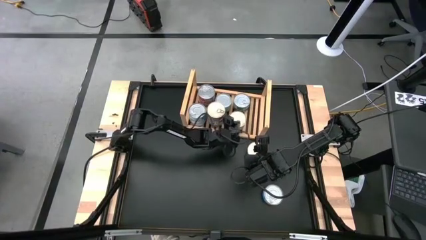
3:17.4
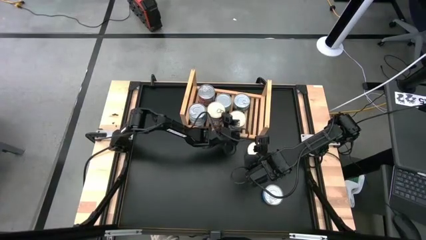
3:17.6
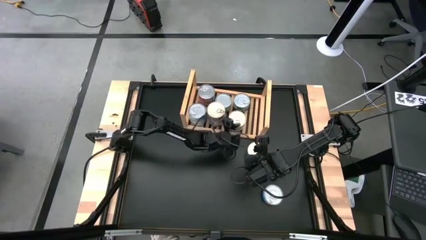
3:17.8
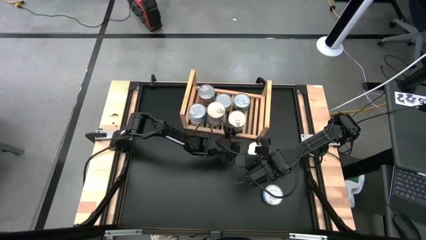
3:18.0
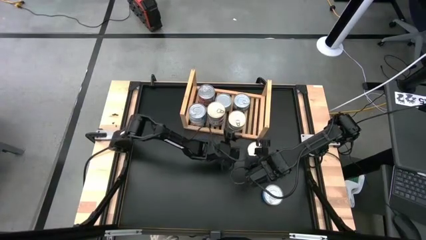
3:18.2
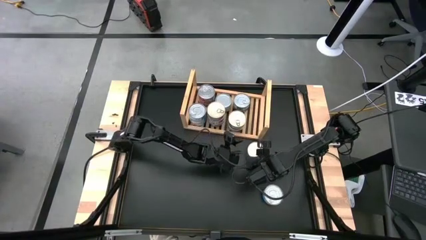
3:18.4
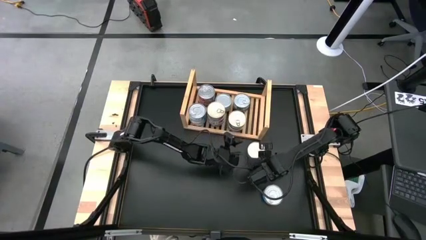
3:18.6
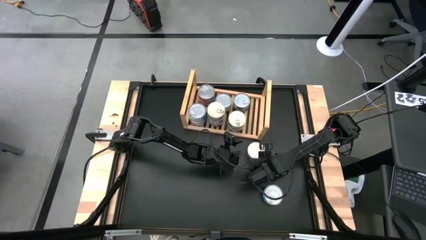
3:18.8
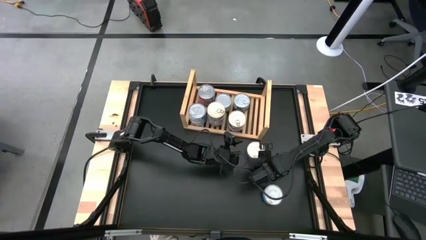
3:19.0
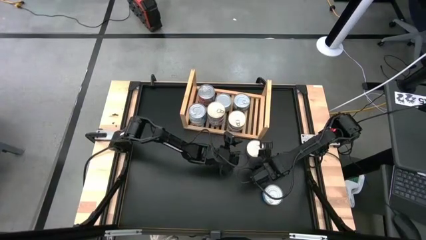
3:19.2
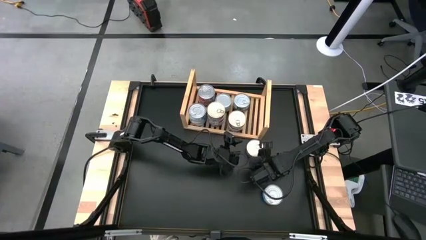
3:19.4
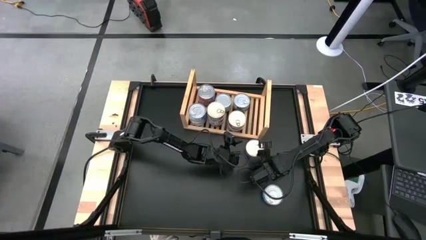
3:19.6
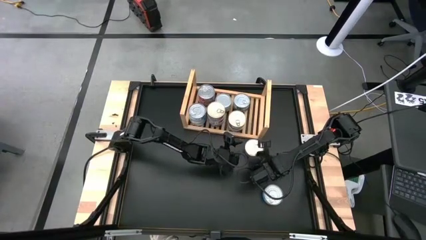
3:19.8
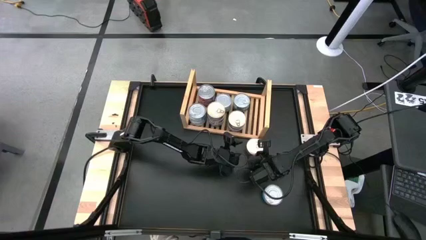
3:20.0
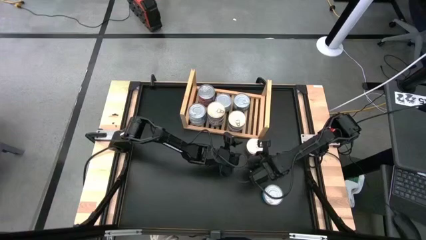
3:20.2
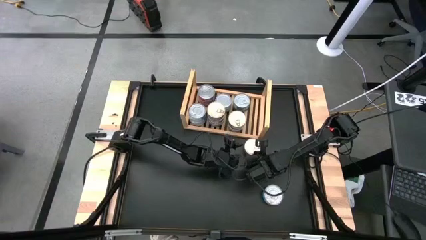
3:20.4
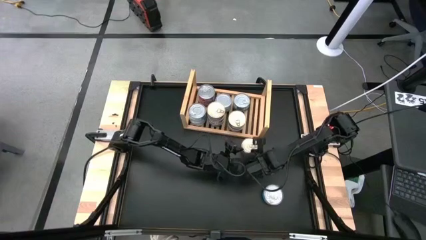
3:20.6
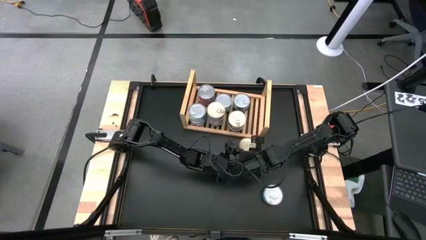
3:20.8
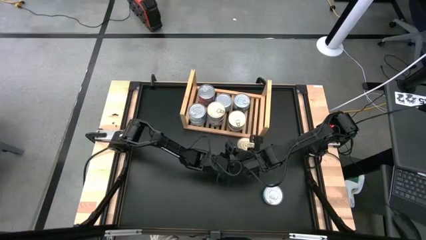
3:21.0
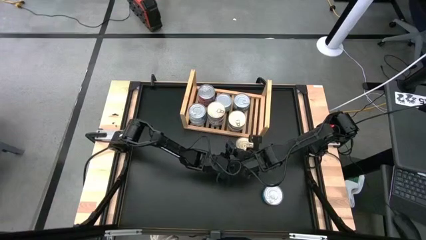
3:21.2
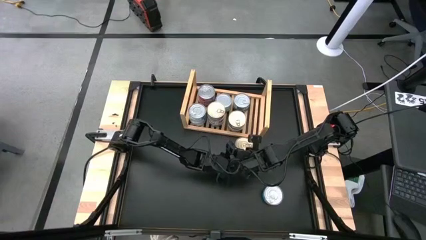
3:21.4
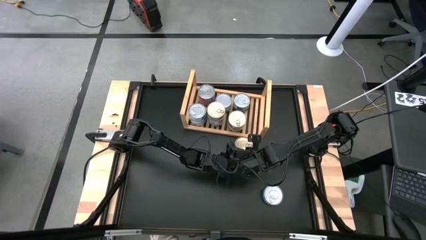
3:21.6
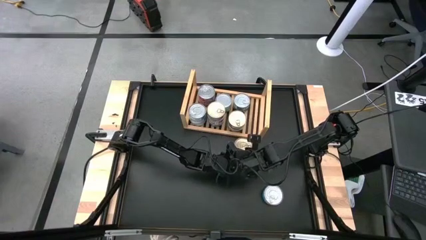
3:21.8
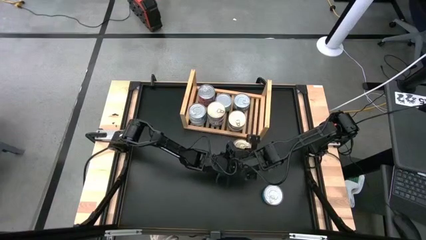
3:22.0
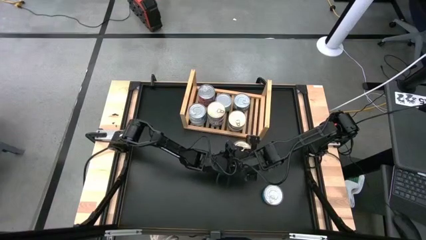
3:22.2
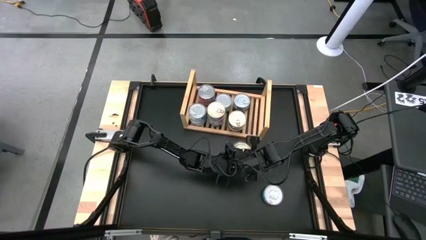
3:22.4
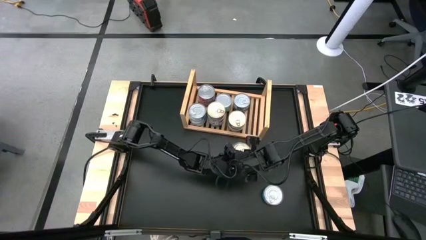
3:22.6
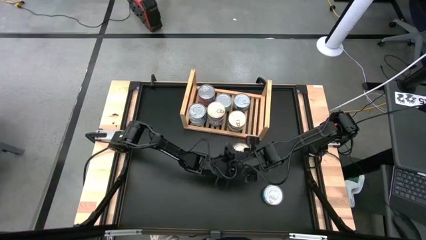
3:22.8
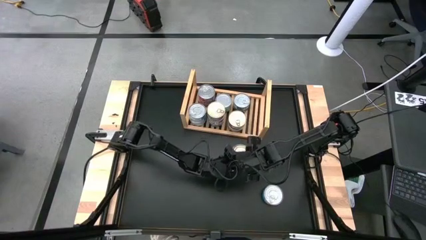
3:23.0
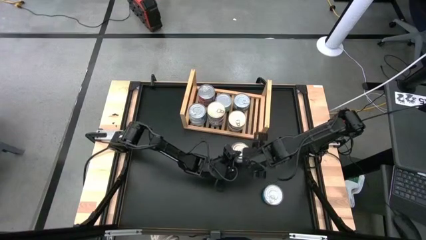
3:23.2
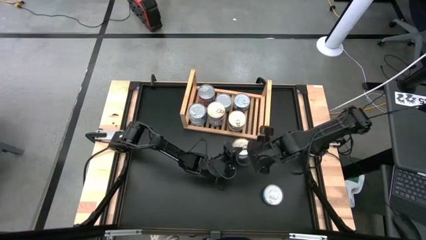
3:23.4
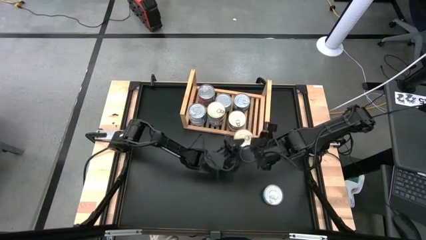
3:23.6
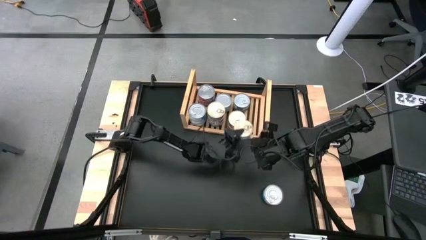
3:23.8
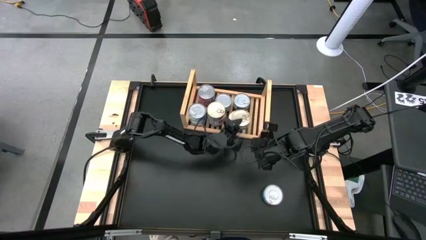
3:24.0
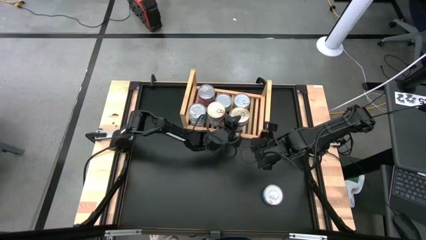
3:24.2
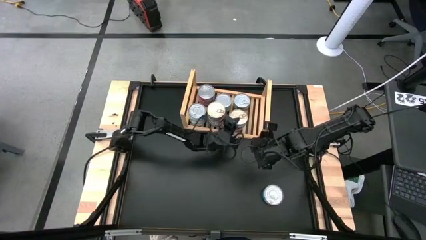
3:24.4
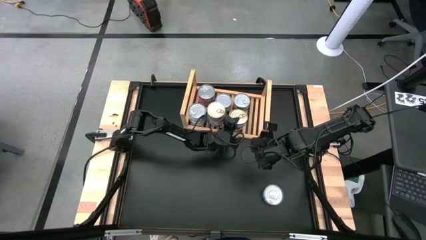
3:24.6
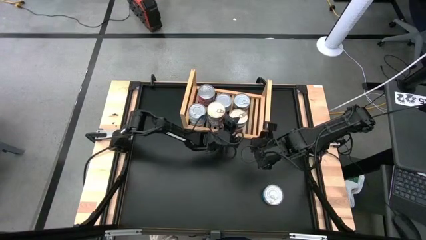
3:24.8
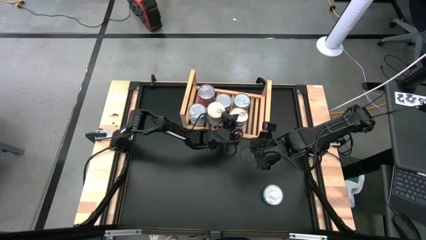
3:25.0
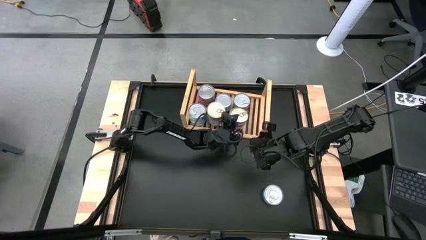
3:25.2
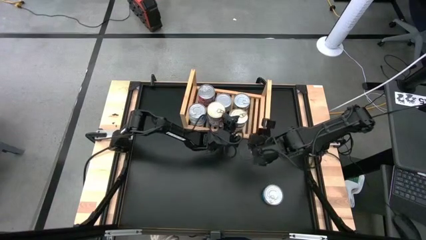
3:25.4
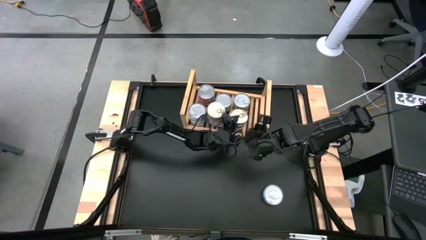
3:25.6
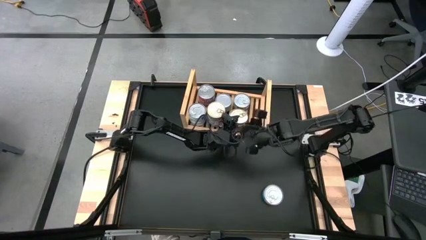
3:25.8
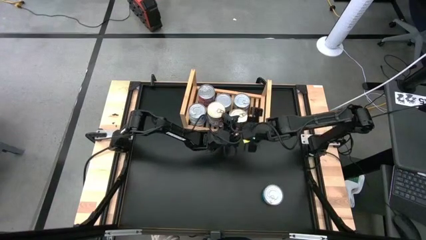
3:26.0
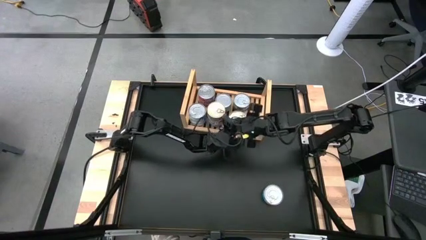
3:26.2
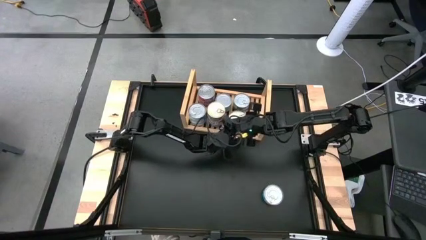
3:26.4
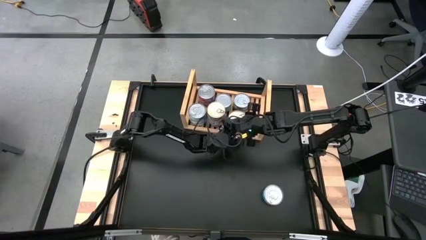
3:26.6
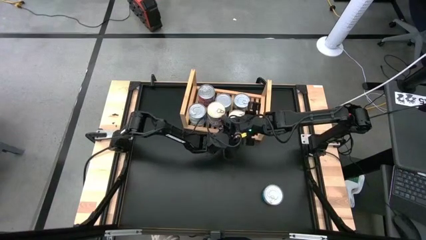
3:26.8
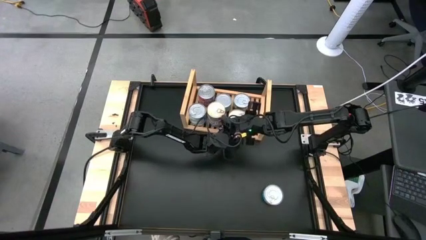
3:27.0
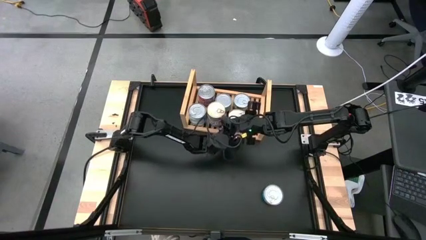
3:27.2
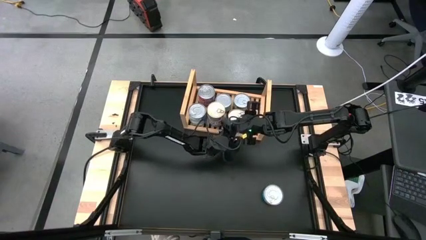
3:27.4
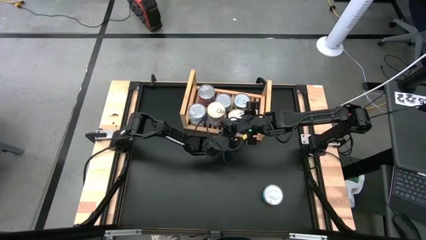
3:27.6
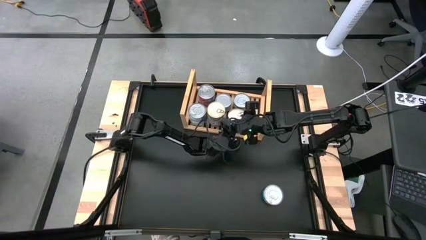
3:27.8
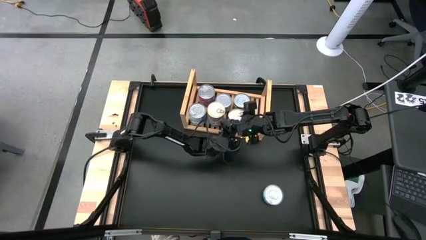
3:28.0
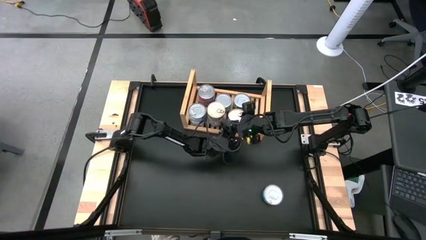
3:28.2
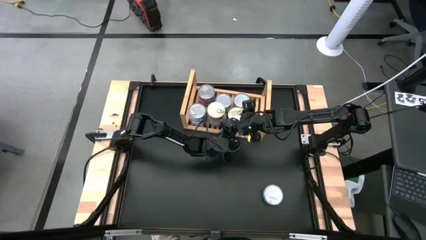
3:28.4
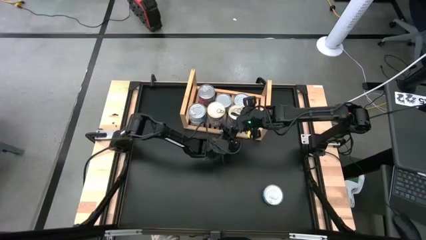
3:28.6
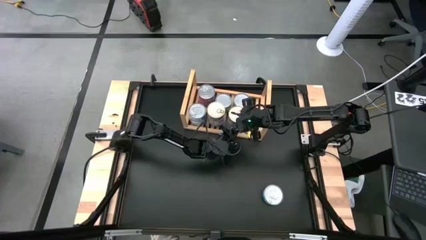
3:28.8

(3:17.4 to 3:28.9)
Task: Stack canned seafood by type on shelf
Stack the blue tuna can on top of the other blue tuna can
